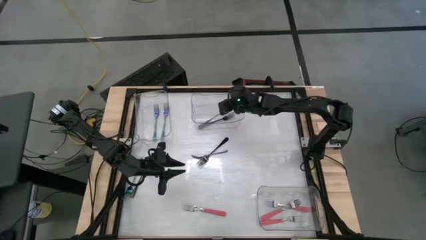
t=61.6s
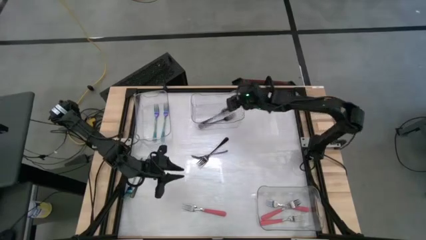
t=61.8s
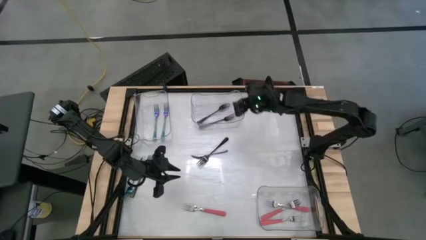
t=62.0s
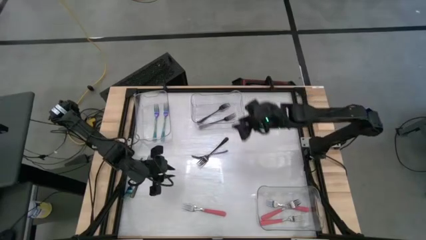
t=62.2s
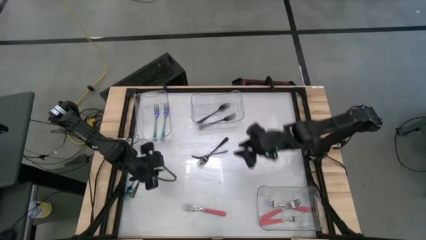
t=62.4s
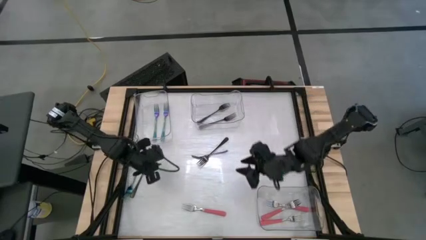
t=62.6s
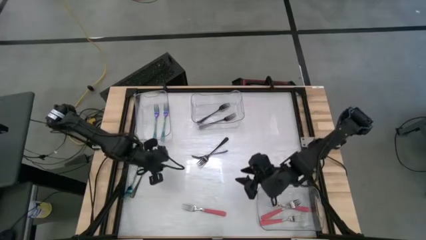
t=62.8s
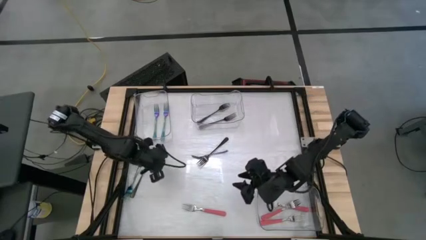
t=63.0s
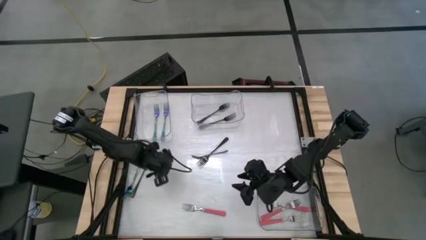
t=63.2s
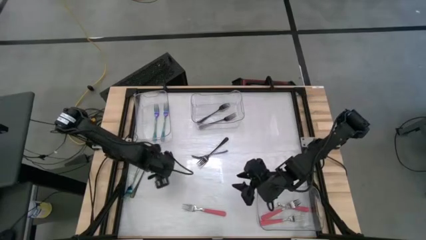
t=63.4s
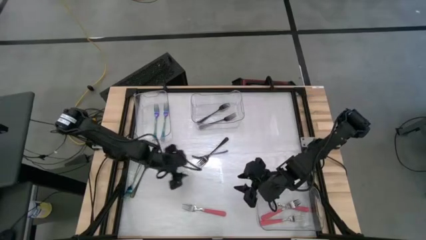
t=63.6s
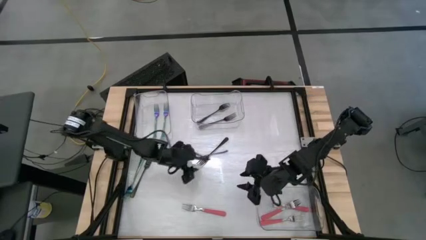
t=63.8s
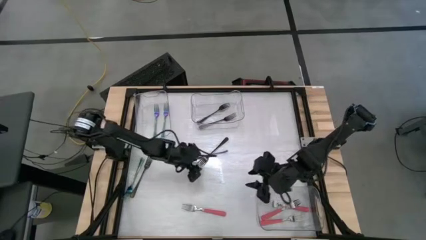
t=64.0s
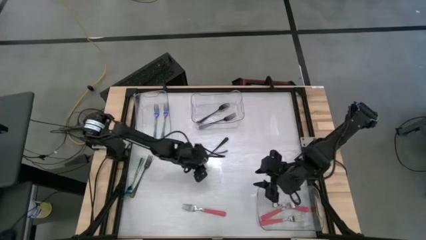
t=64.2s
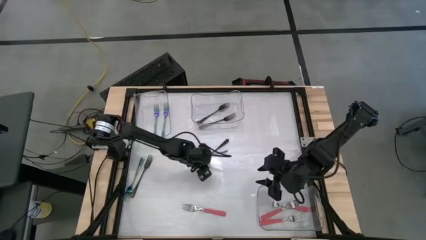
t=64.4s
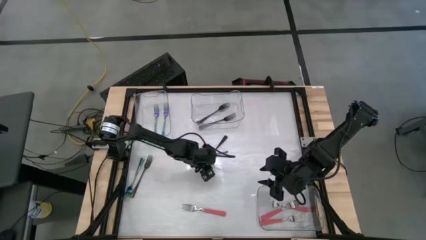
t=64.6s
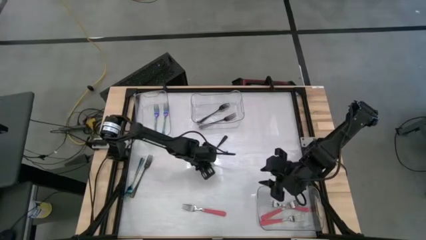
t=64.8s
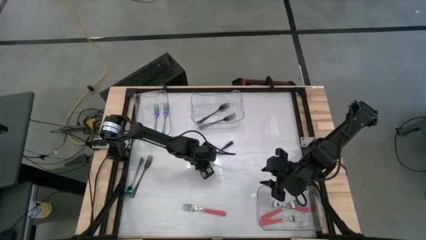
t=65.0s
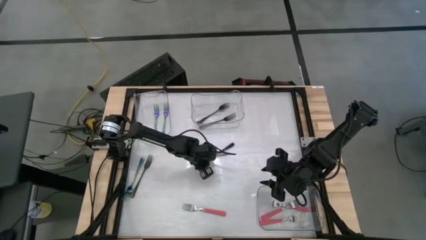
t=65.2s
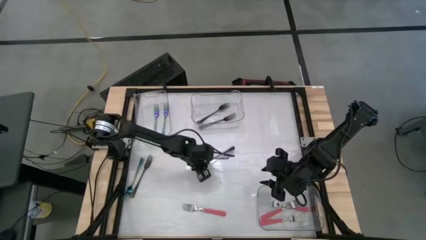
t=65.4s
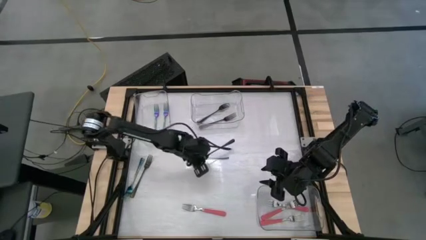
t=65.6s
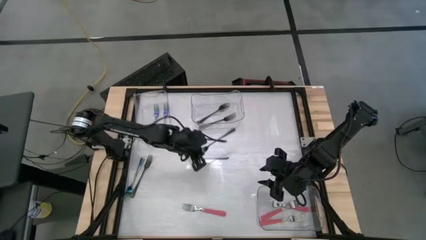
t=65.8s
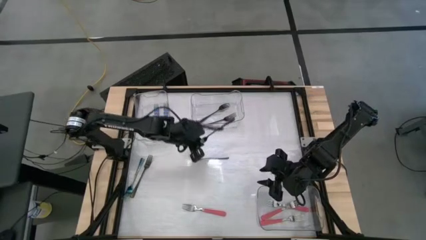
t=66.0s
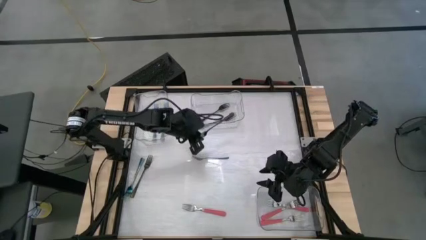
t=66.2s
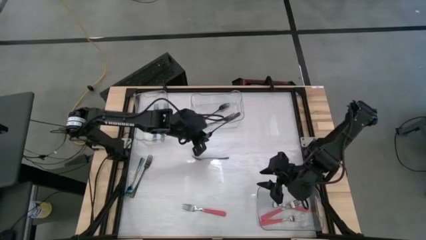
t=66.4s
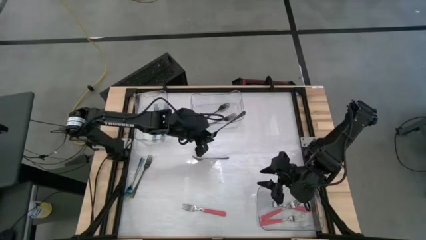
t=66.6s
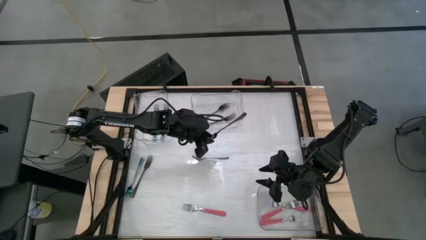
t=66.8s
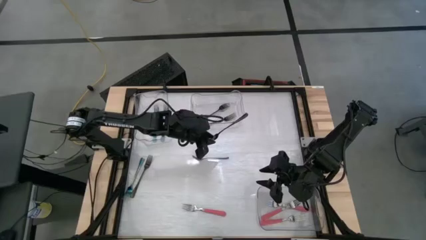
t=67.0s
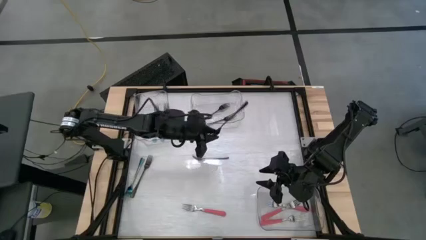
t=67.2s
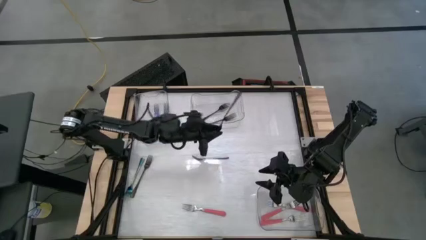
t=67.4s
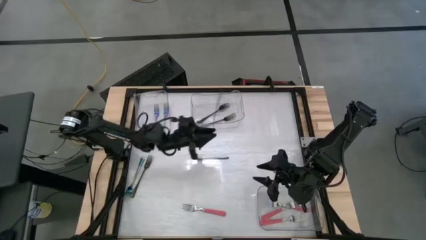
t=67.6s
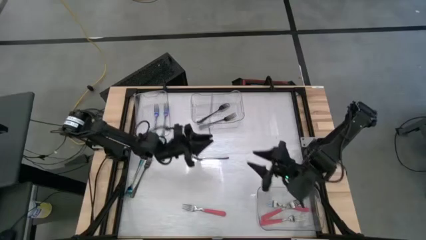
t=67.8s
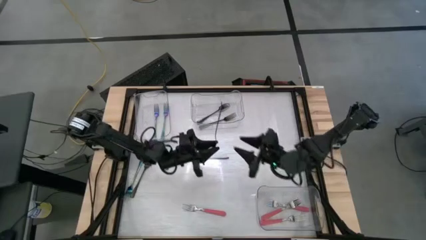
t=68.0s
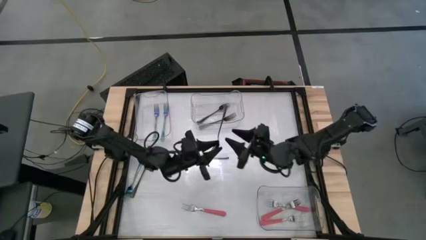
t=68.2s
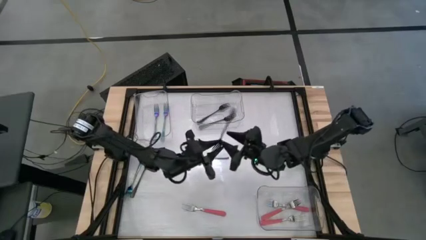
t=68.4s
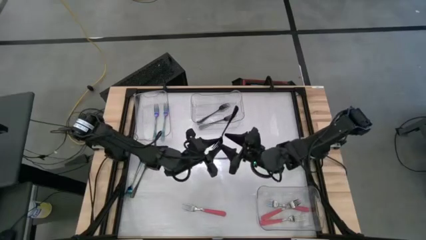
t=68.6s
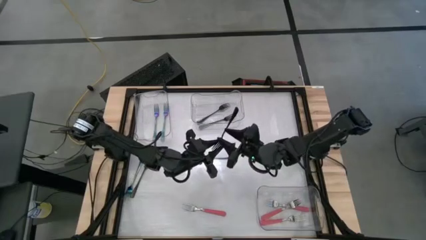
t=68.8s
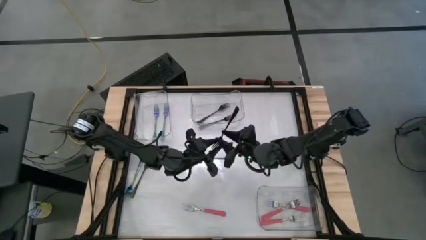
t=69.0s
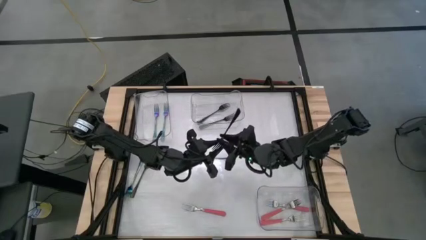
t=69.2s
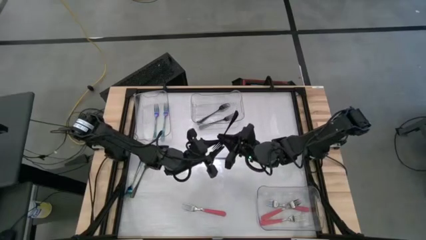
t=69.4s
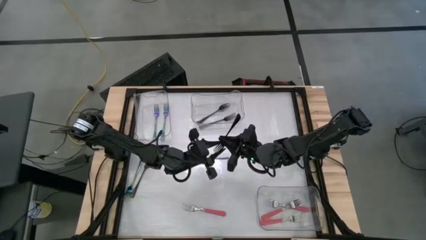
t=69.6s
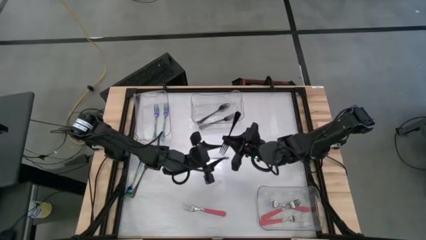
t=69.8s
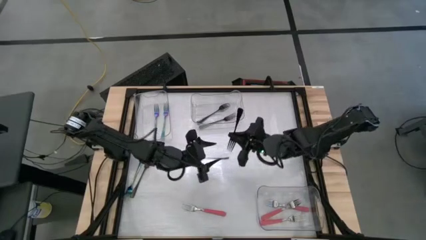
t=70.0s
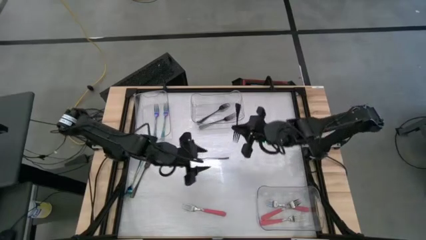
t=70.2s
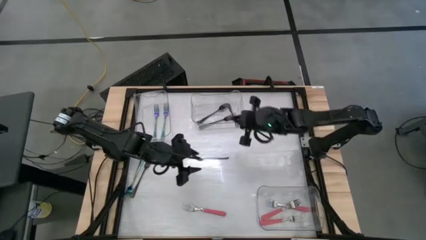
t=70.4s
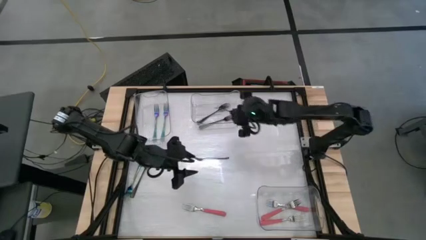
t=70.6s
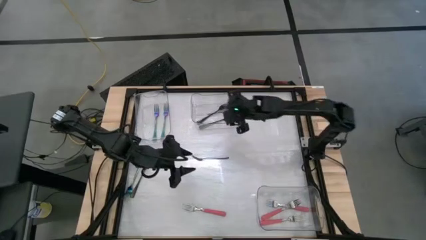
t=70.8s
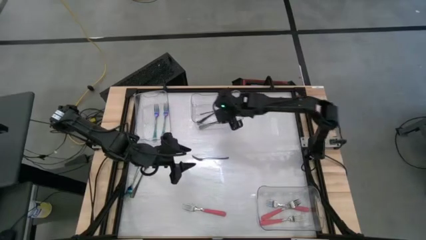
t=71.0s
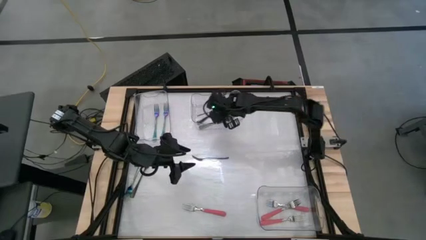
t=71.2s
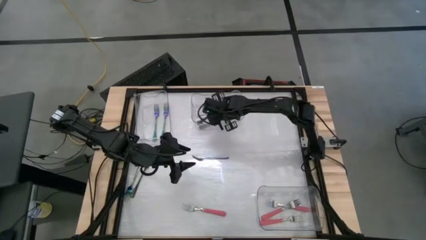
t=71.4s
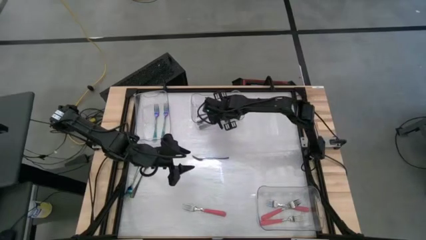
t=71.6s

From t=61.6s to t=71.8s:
Task: Sort silverware by color (type)
Put the black fork into the top right transparent bin

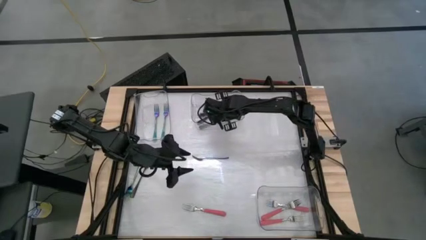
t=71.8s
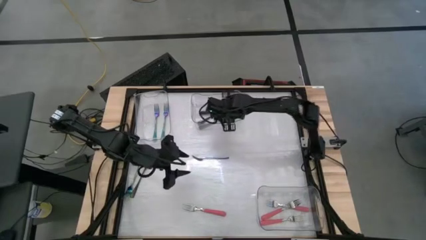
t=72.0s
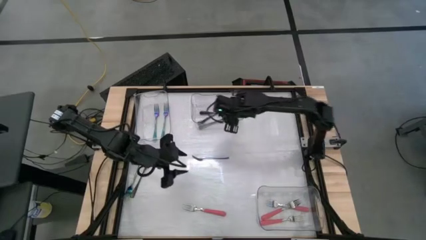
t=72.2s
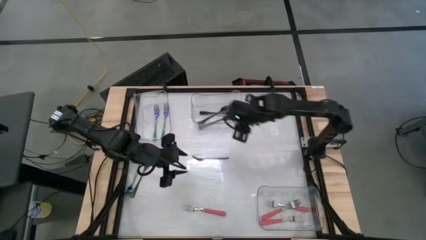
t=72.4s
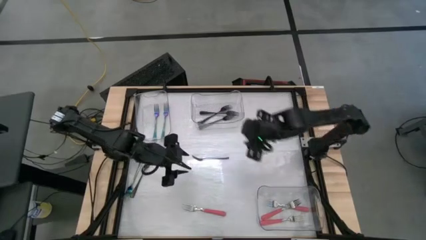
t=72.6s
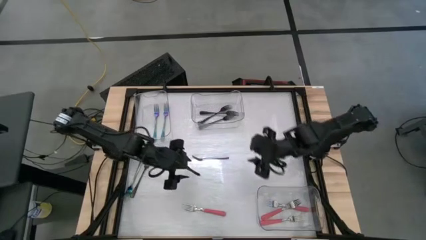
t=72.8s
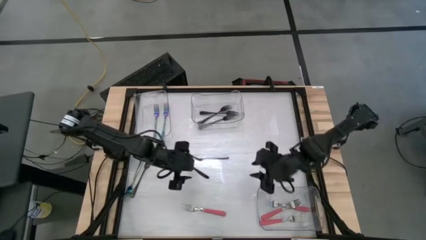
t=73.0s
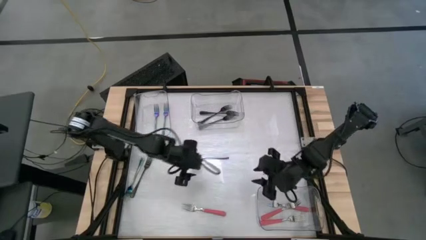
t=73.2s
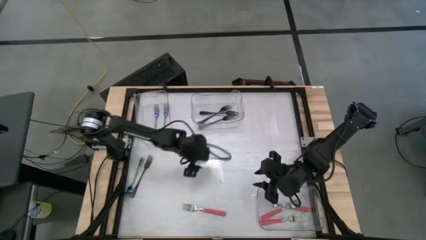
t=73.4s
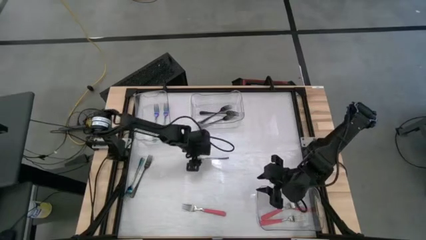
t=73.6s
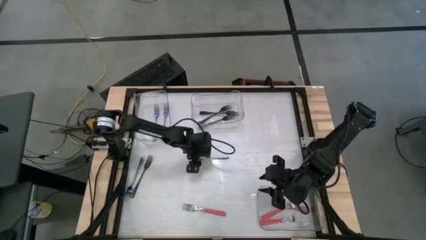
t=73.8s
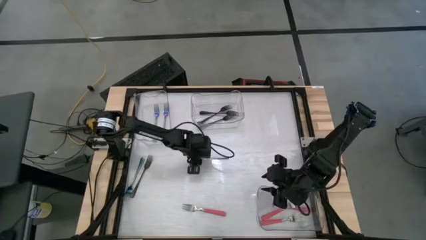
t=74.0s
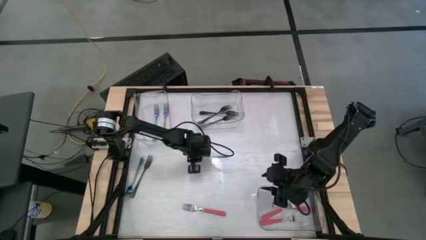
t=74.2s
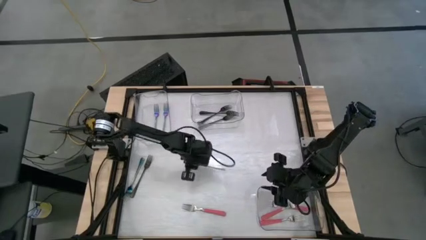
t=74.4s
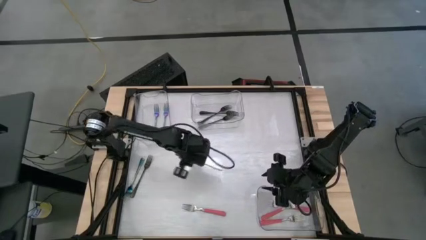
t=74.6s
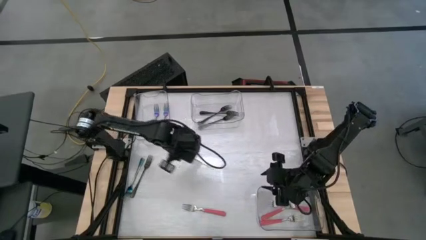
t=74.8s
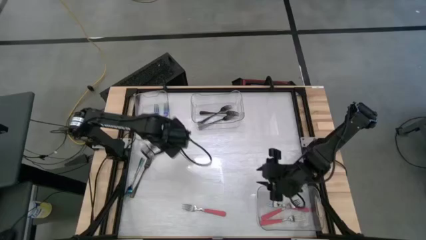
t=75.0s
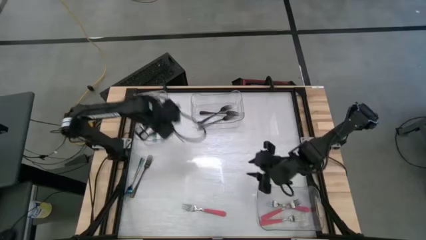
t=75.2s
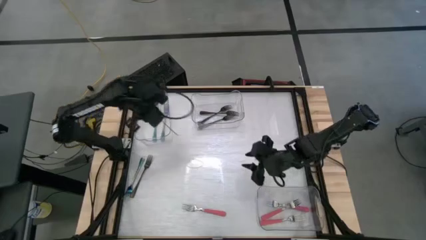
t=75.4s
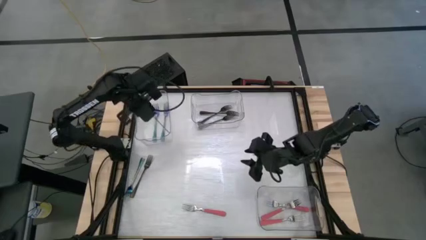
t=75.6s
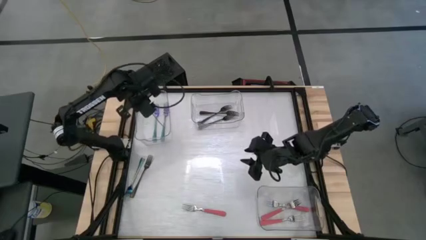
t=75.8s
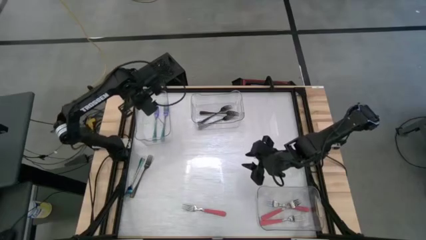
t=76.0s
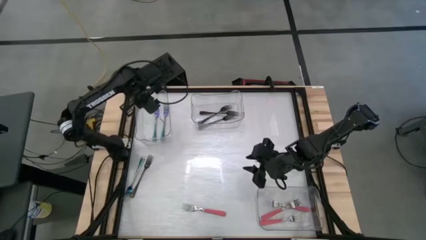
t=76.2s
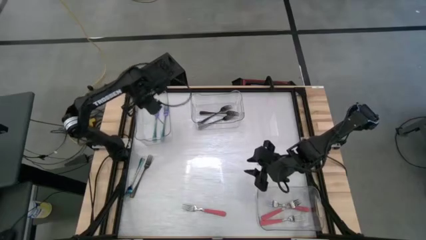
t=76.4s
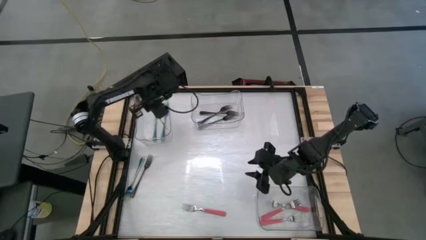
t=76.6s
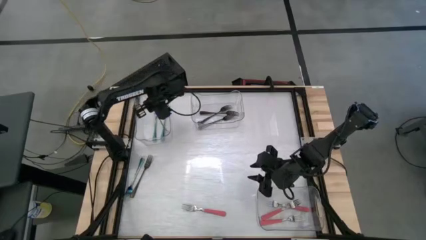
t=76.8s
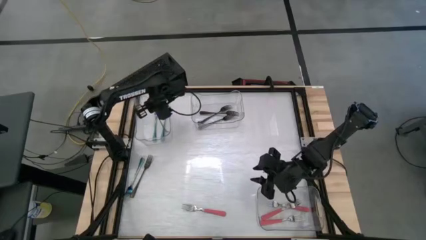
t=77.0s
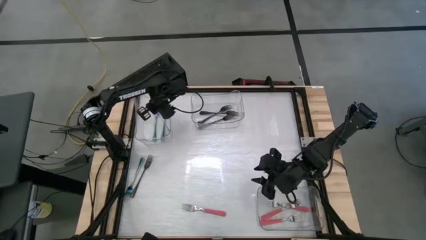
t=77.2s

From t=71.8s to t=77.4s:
Put the purple fork into the top left transparent bin
